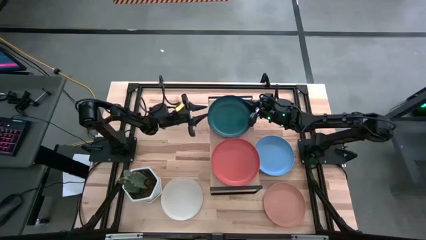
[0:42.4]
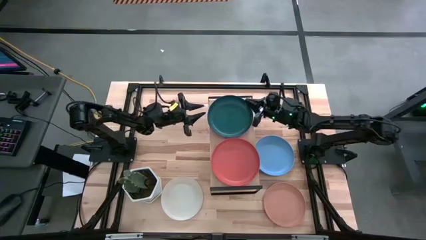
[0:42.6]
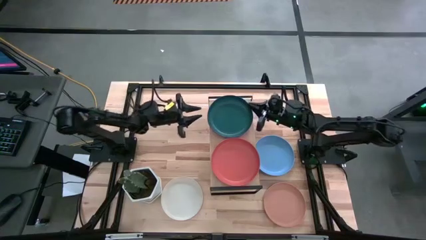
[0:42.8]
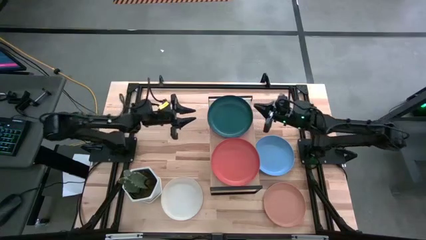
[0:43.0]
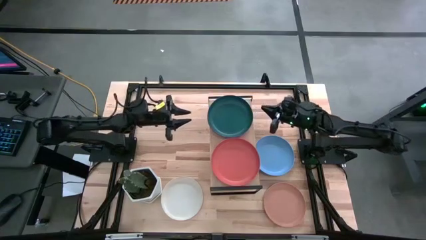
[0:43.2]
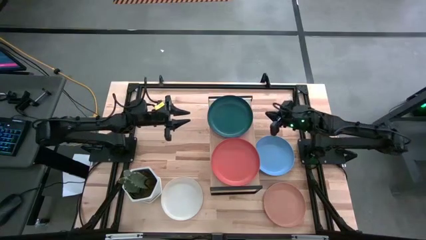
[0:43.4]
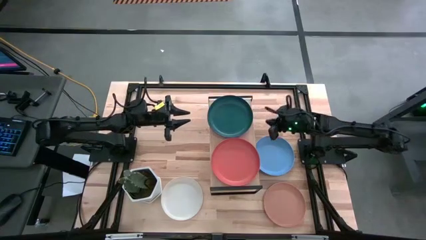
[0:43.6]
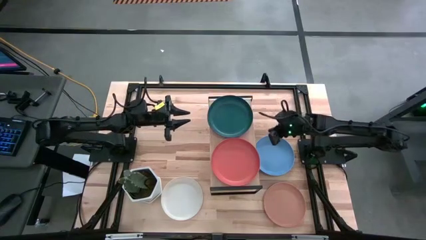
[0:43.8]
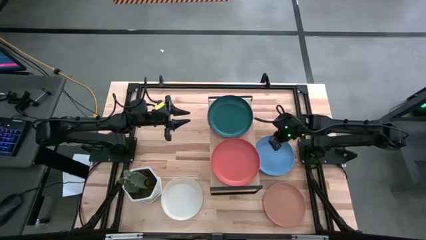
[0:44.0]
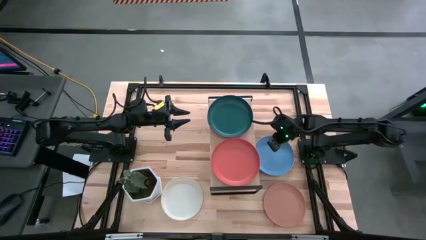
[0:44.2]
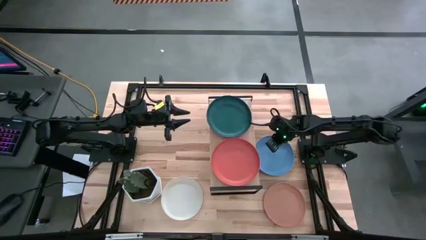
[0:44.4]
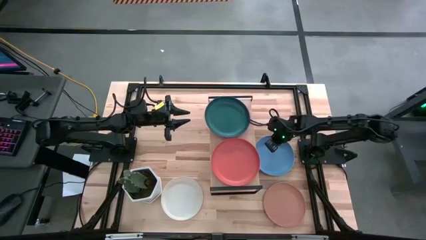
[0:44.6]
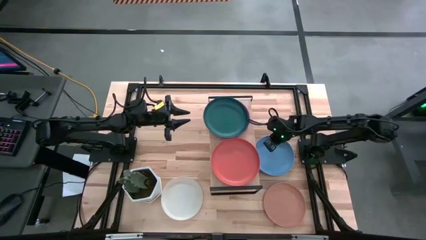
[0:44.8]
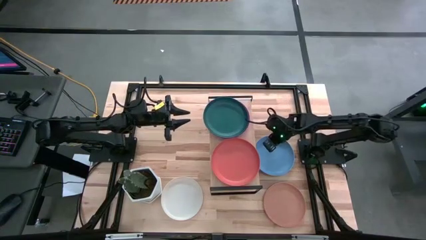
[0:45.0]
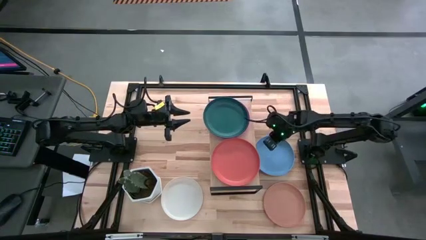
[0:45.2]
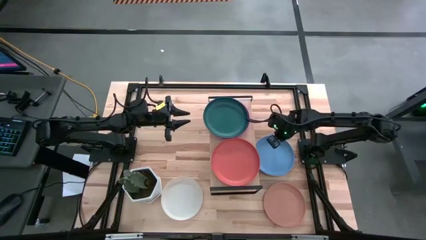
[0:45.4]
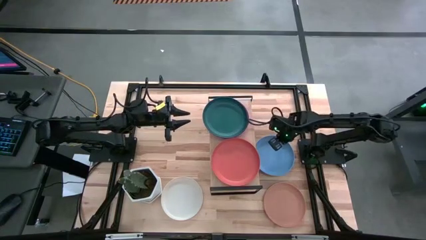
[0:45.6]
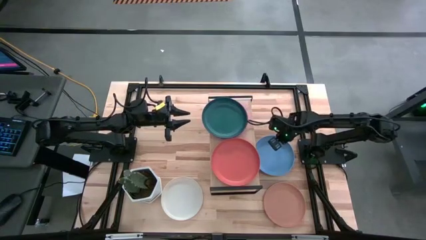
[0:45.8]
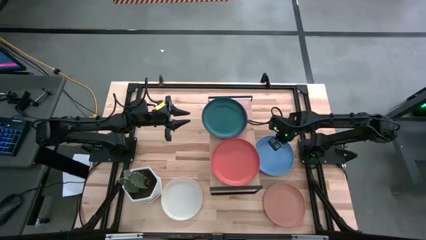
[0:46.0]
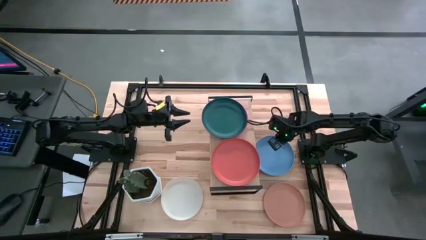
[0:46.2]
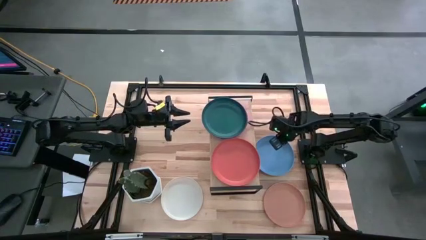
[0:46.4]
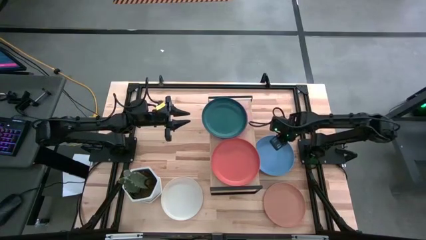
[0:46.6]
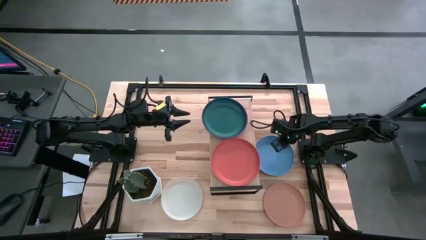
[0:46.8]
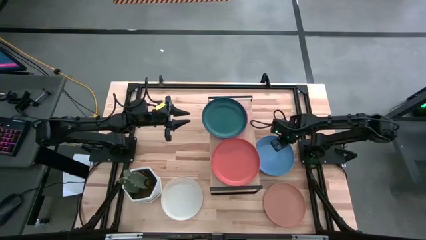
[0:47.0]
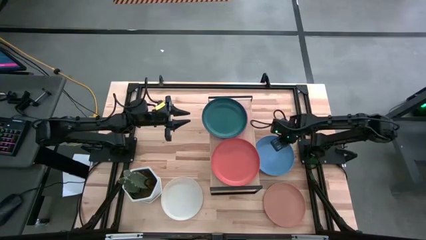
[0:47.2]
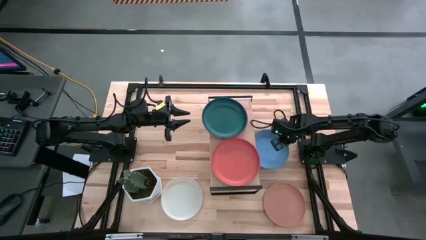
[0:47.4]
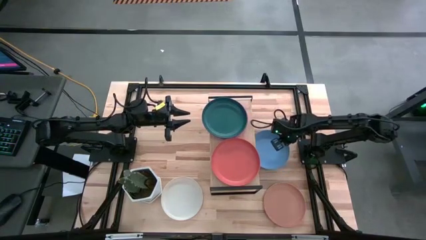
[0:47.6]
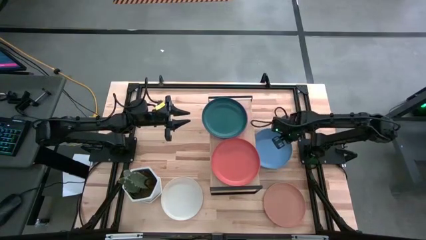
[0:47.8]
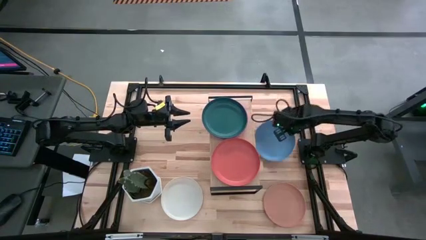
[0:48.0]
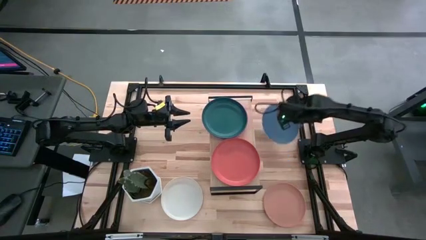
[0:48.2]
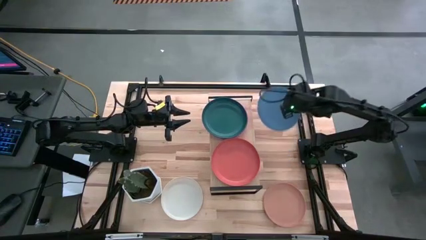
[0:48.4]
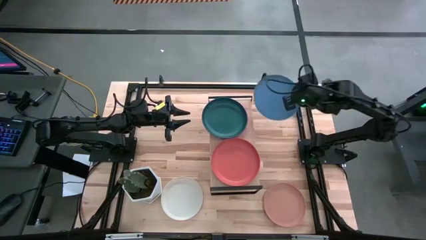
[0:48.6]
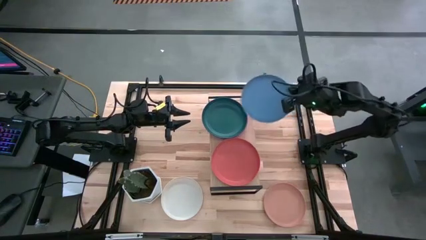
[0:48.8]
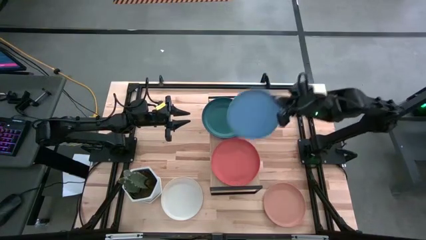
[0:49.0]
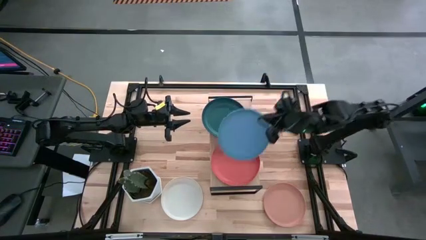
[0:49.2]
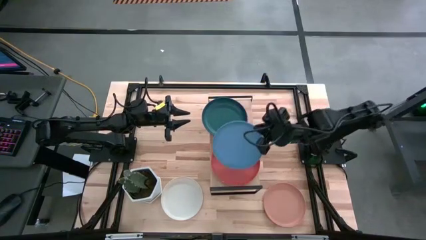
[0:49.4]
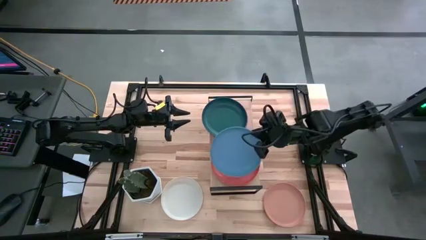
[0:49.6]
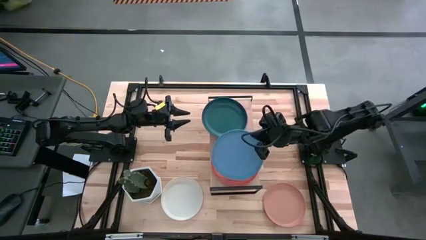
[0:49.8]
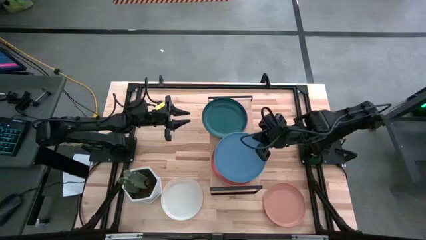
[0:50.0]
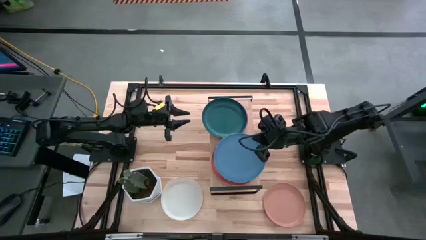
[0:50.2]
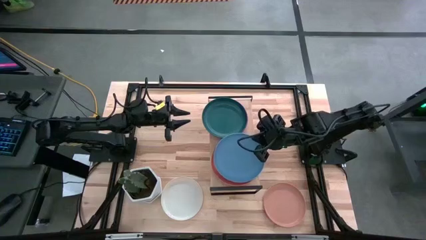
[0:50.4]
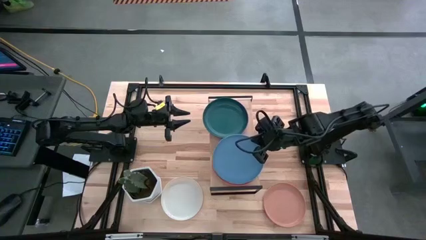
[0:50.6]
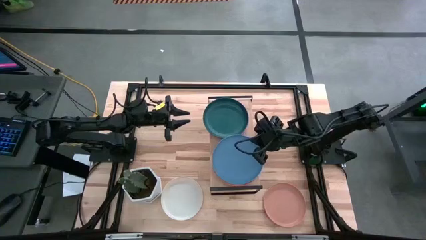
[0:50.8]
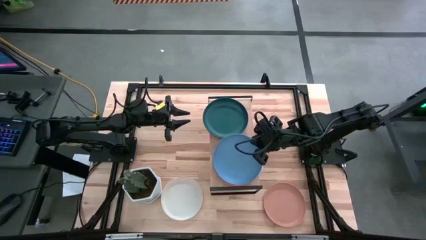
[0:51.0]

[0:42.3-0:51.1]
Task: Place and stack plates onto a shelf
Stack the blue plate on top of the orange plate

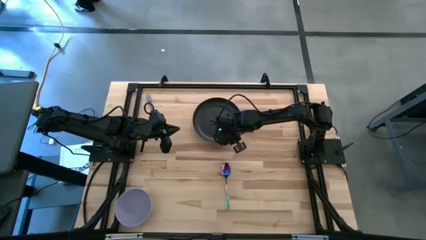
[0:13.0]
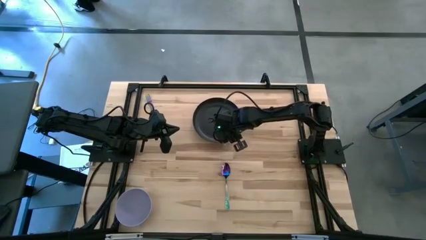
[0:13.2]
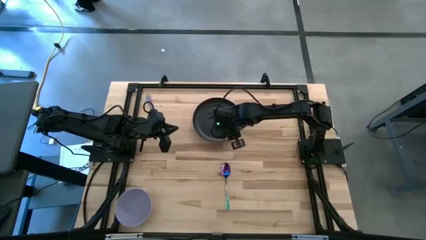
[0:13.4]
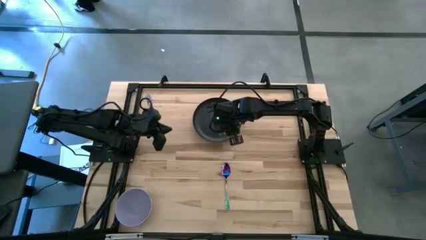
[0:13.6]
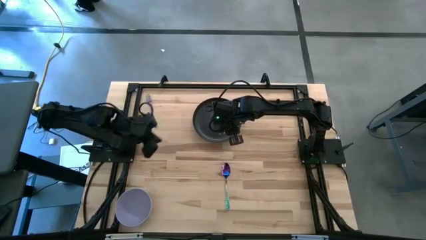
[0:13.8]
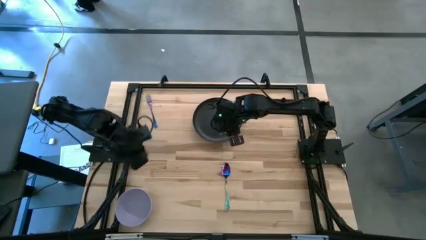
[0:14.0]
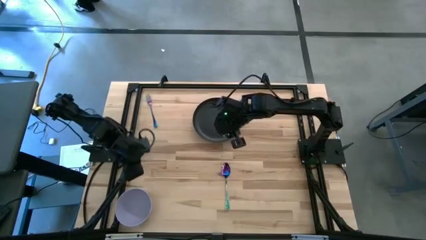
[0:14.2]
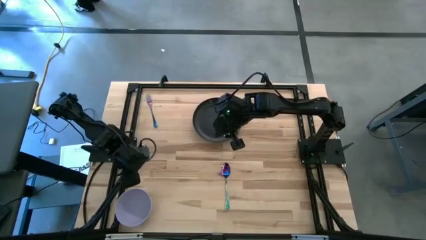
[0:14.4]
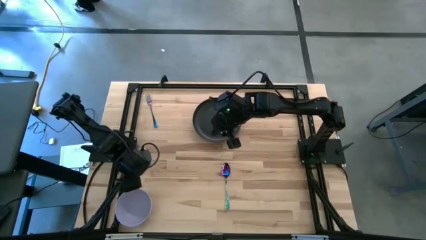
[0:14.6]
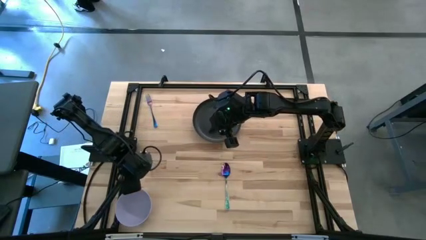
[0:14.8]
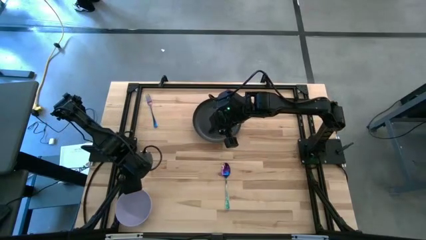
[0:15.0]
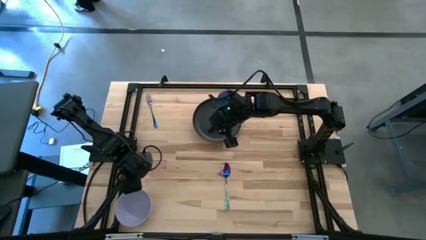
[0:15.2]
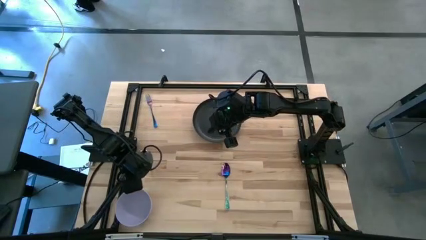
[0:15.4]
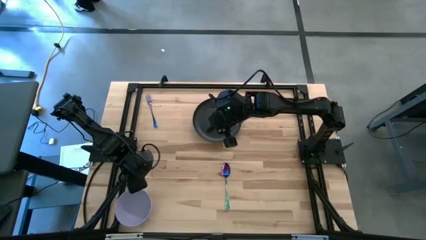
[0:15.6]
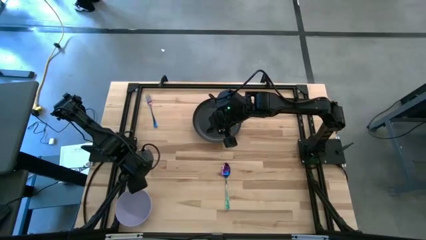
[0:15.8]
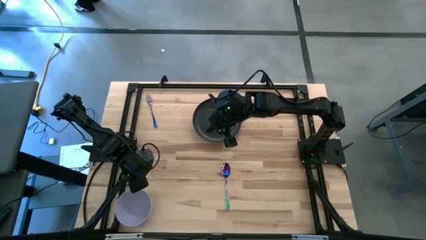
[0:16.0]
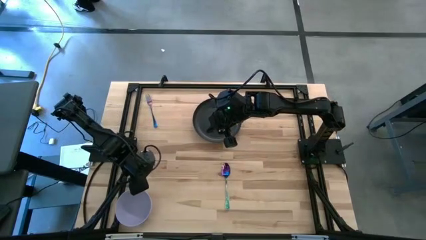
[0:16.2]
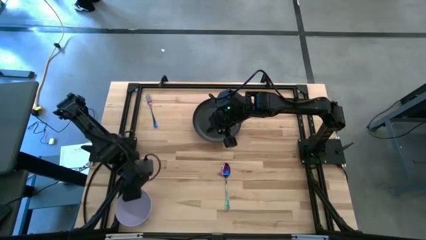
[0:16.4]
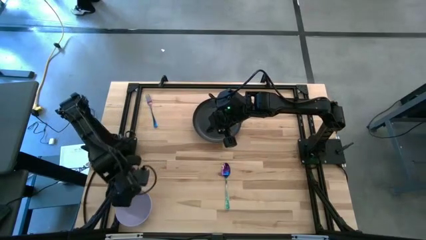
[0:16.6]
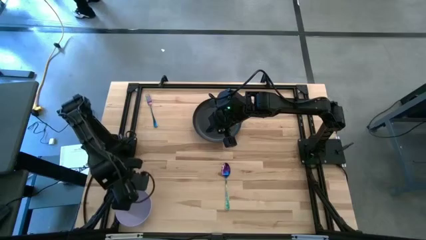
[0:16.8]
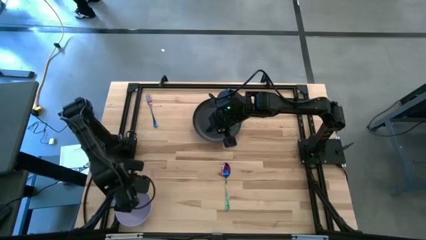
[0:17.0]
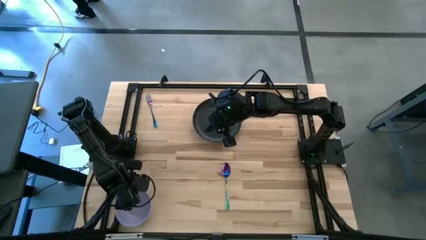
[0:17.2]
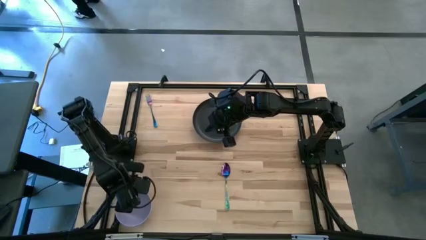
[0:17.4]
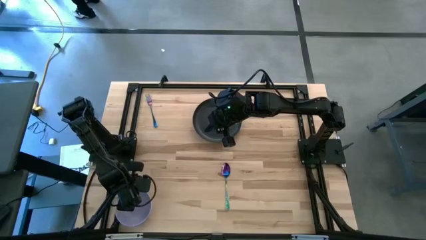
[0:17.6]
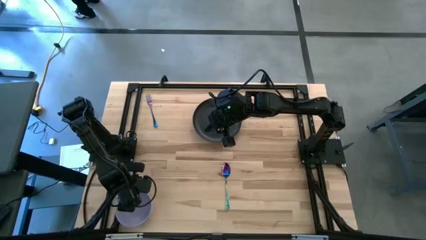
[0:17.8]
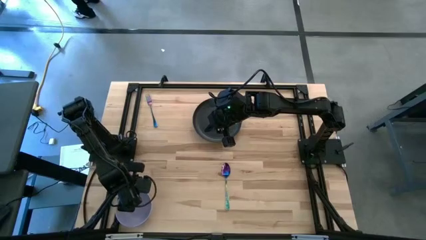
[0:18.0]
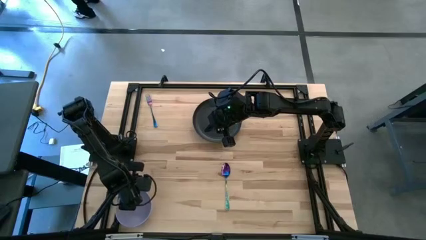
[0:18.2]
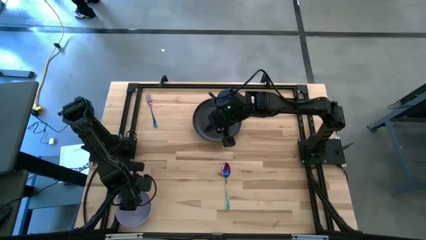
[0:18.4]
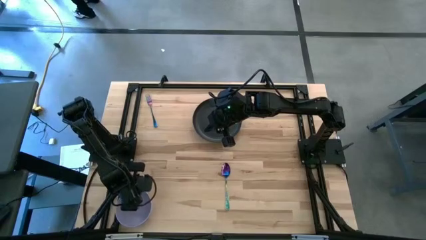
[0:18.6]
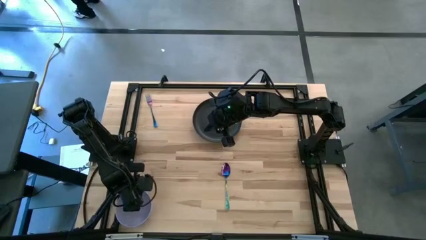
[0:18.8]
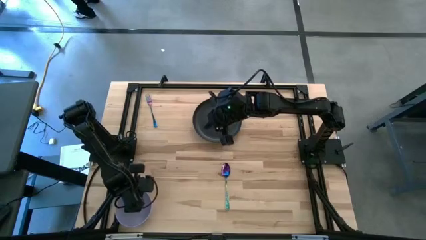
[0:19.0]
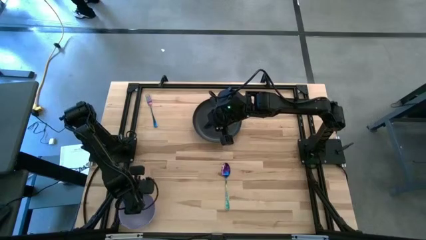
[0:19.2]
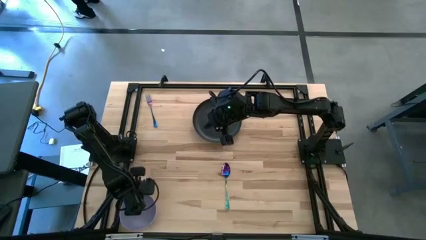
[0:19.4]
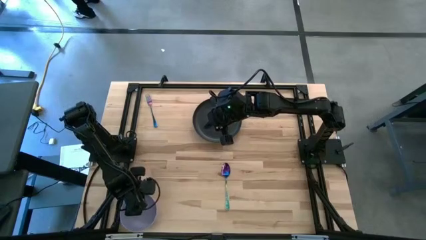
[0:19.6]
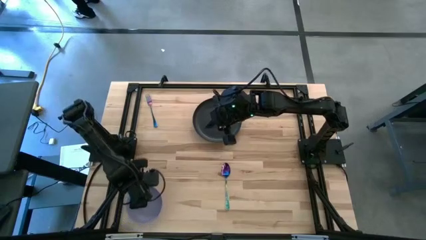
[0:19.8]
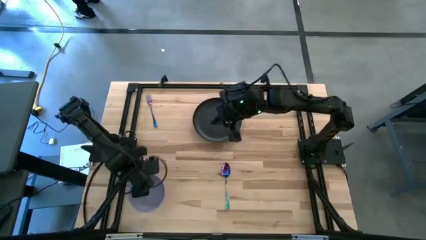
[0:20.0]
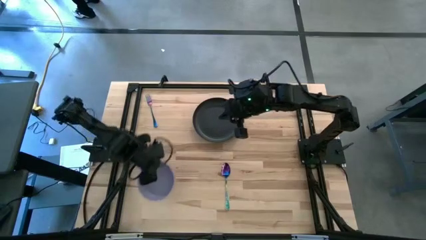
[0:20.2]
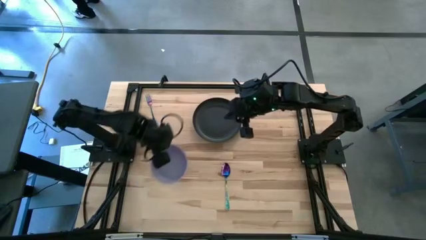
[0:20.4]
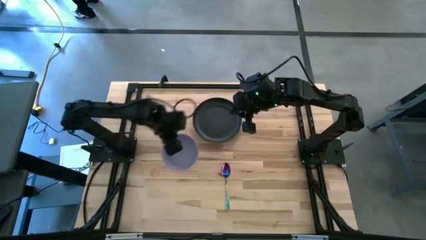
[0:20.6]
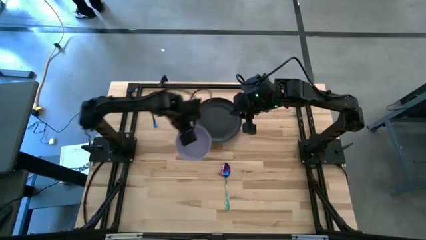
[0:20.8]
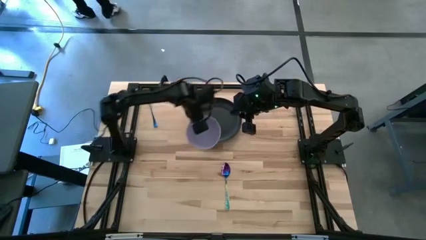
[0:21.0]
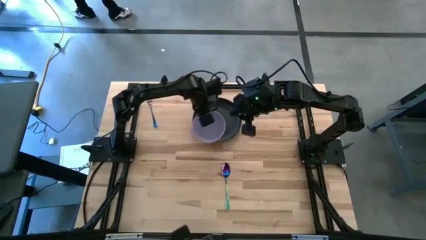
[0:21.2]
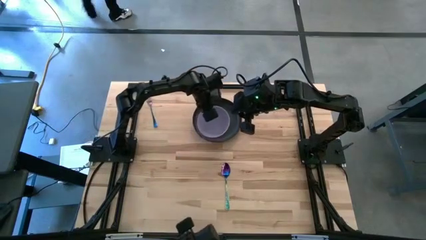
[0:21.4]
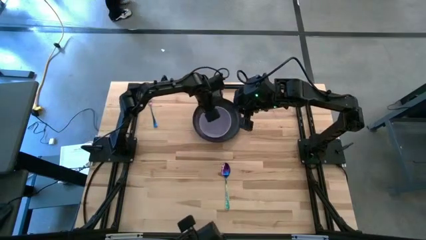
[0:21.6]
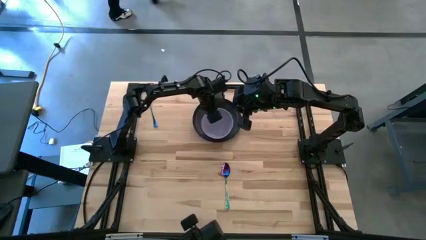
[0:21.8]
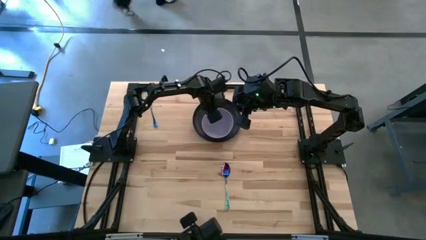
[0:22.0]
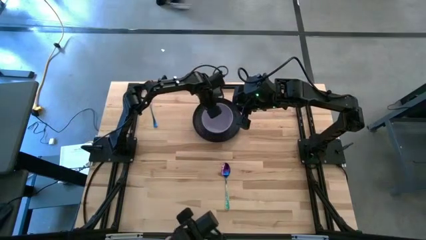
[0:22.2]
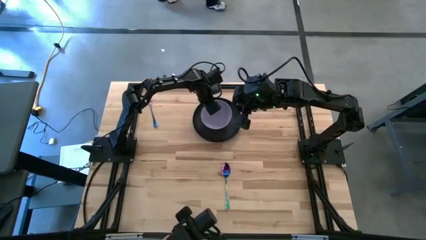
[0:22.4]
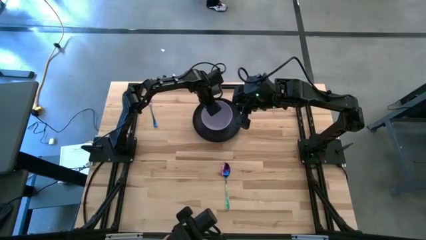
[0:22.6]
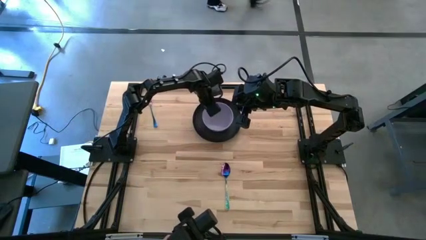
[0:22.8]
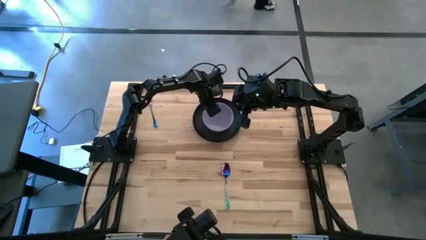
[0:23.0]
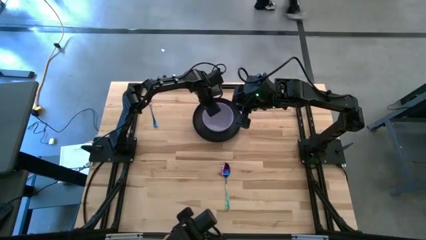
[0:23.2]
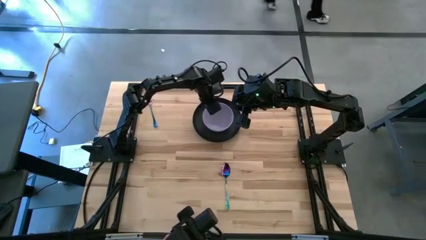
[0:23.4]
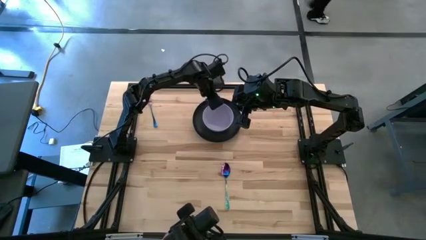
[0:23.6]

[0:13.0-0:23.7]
Task: Set table place
Put the light purple bowl on top of the black plate
